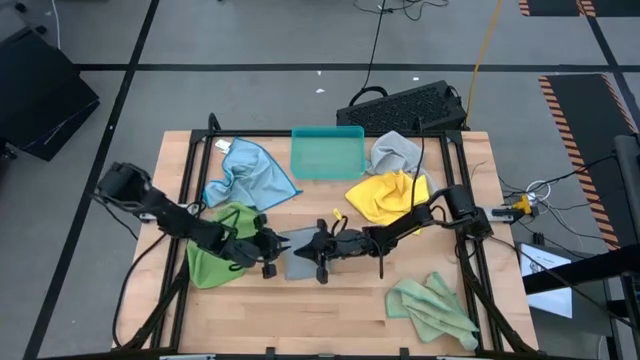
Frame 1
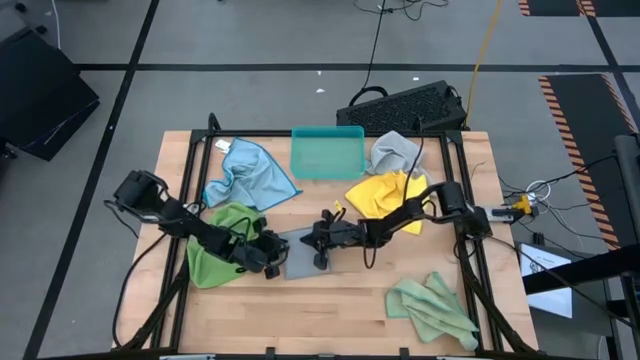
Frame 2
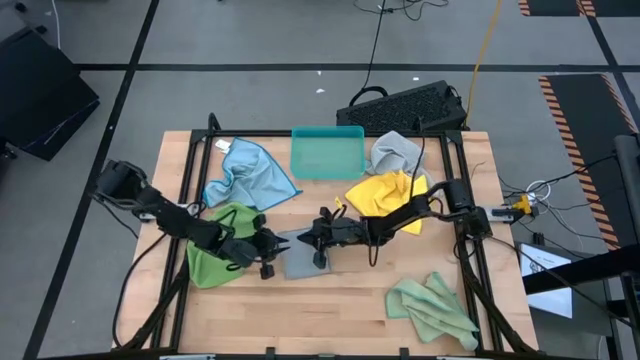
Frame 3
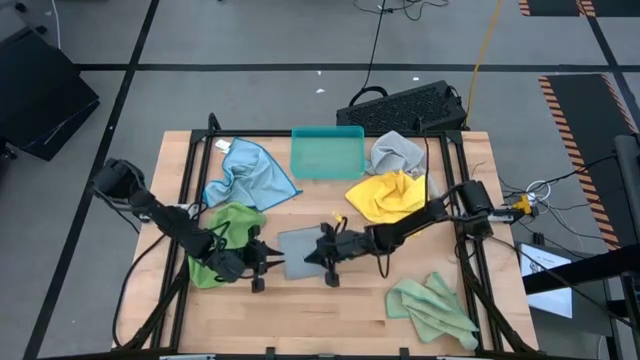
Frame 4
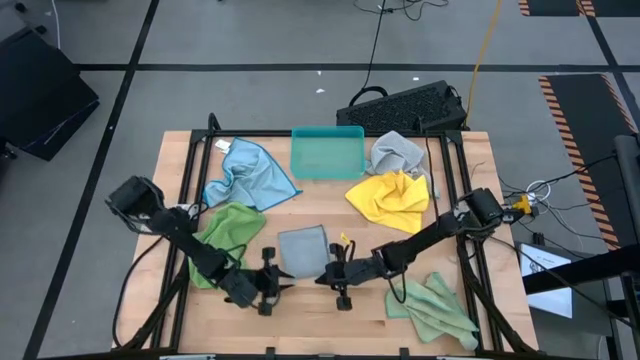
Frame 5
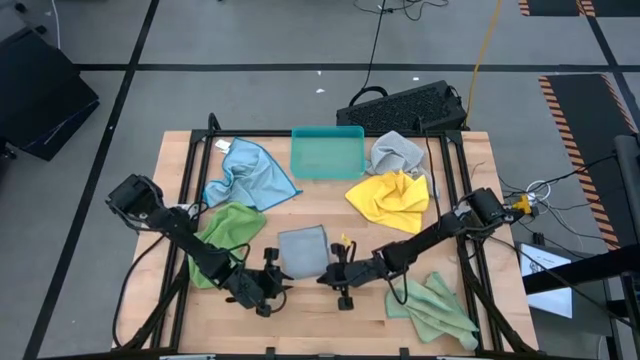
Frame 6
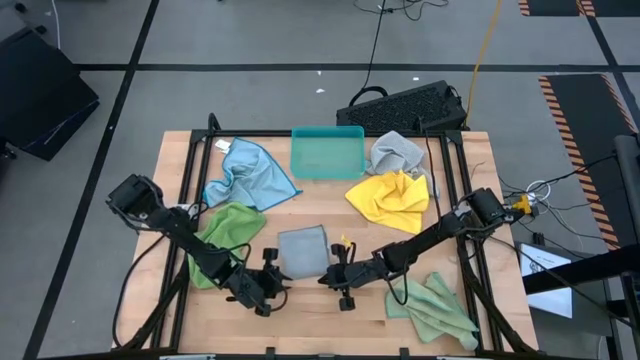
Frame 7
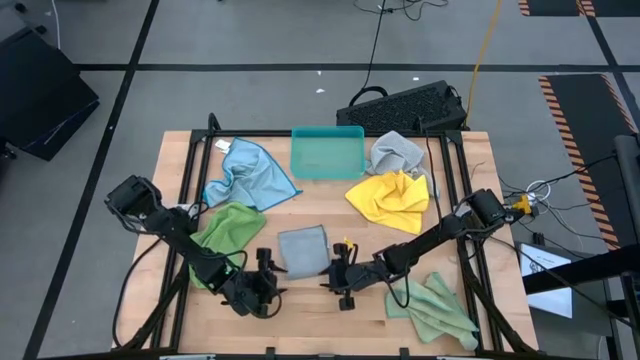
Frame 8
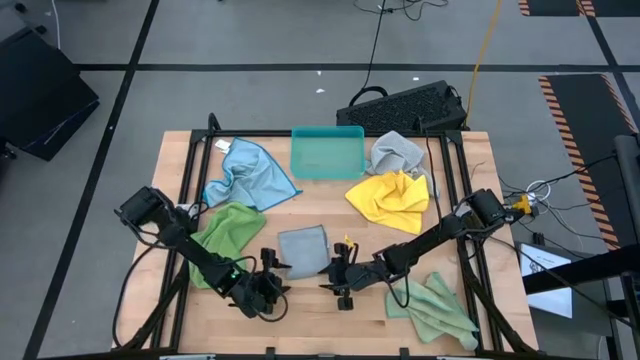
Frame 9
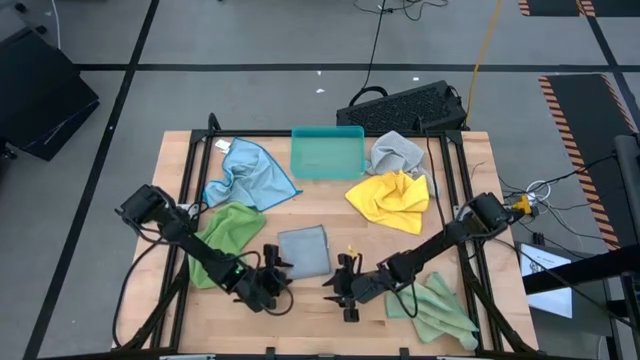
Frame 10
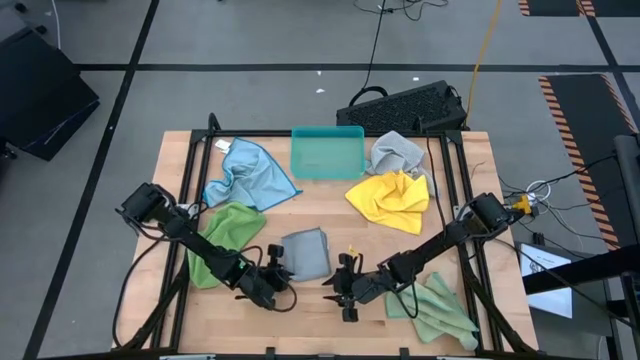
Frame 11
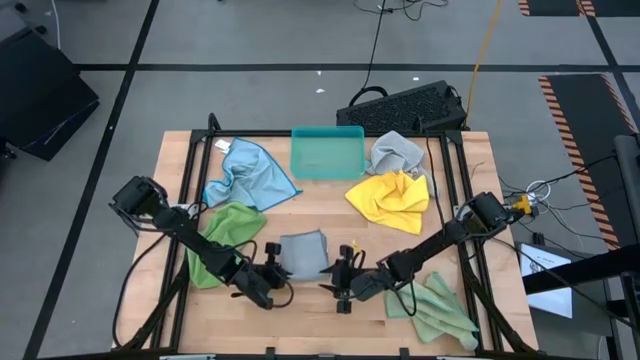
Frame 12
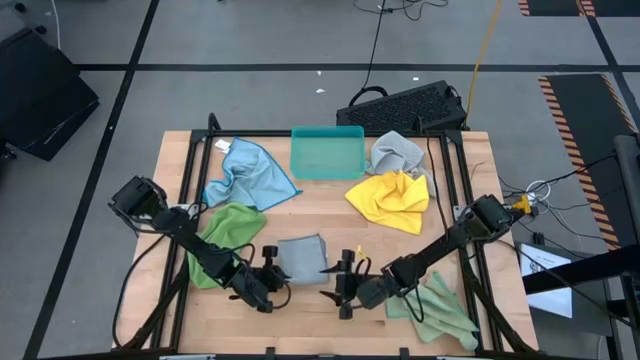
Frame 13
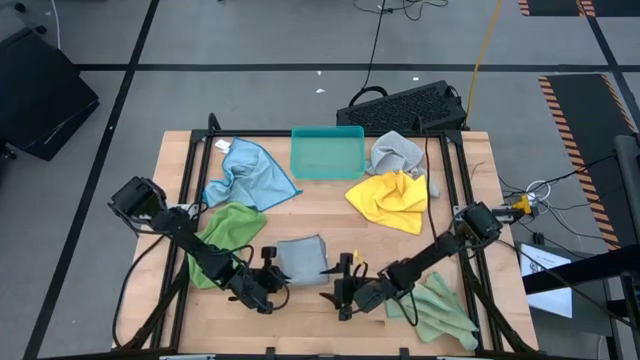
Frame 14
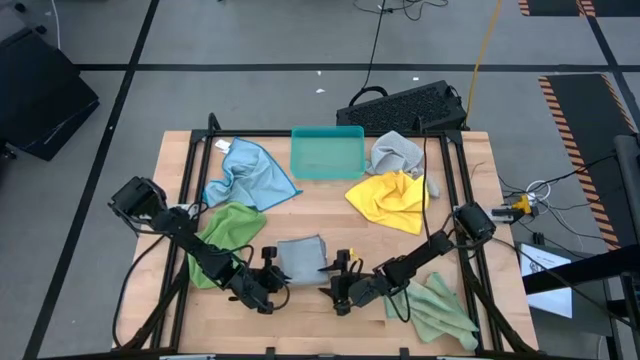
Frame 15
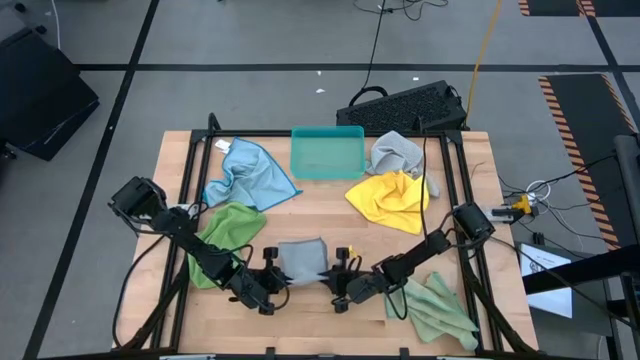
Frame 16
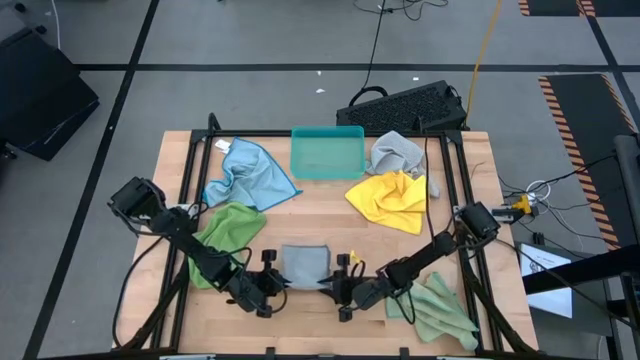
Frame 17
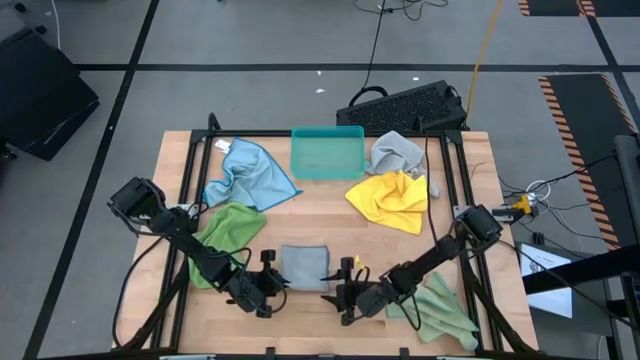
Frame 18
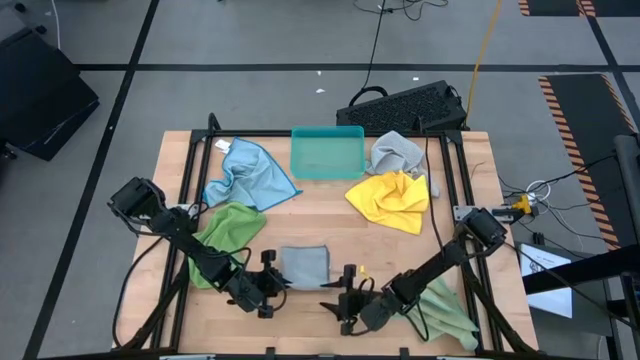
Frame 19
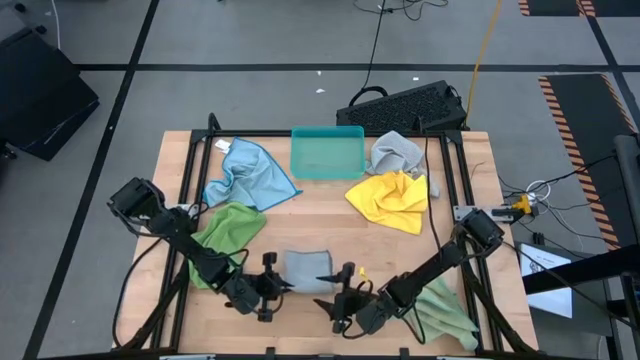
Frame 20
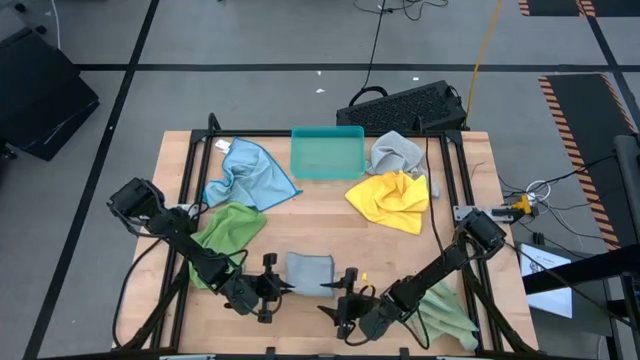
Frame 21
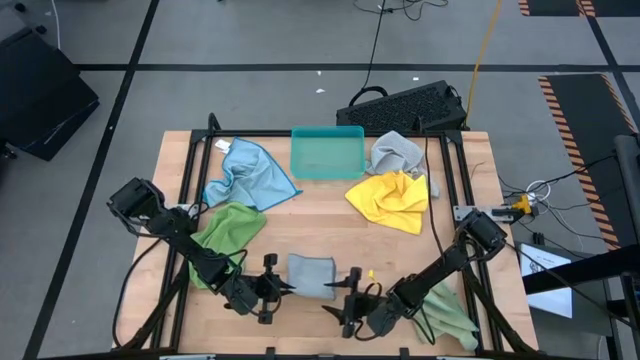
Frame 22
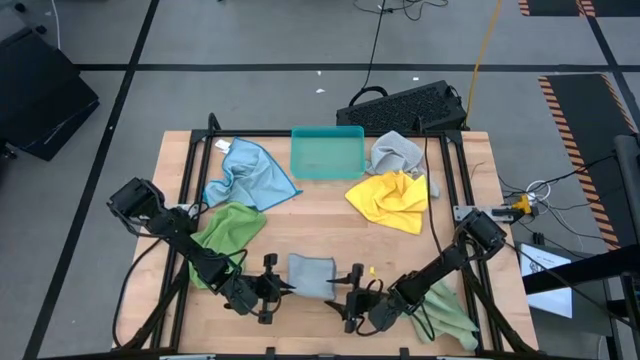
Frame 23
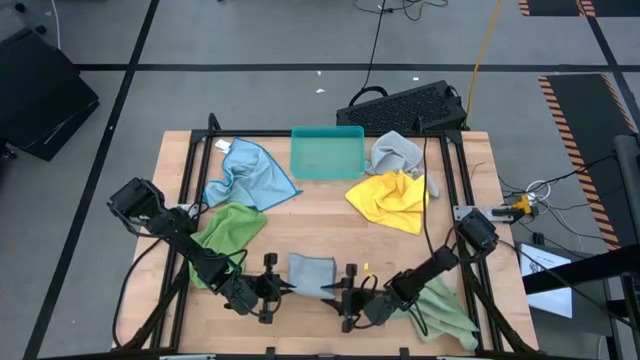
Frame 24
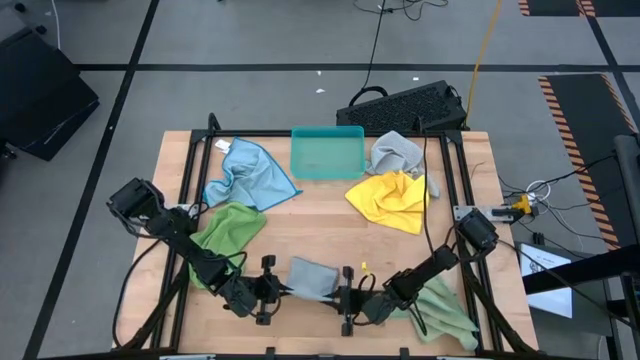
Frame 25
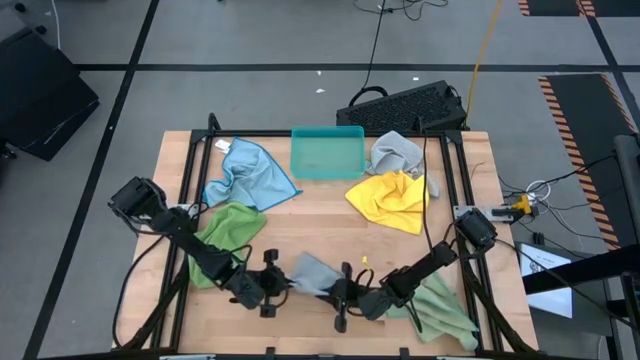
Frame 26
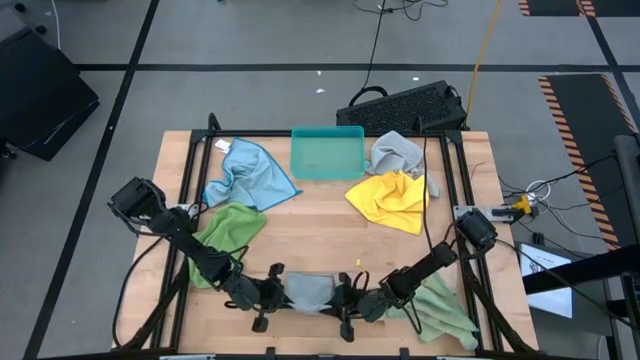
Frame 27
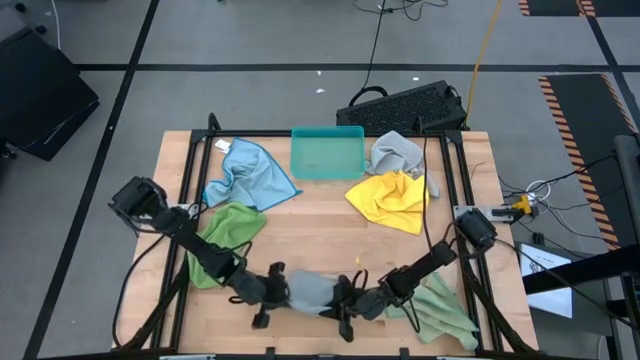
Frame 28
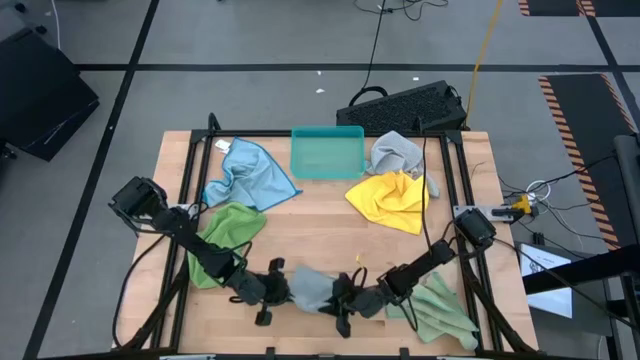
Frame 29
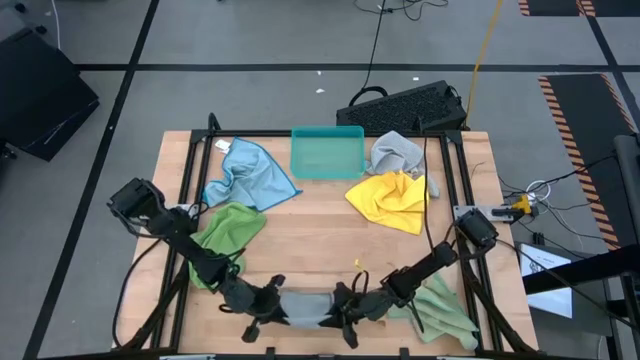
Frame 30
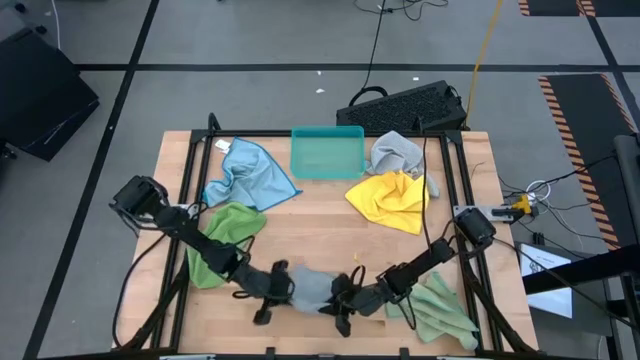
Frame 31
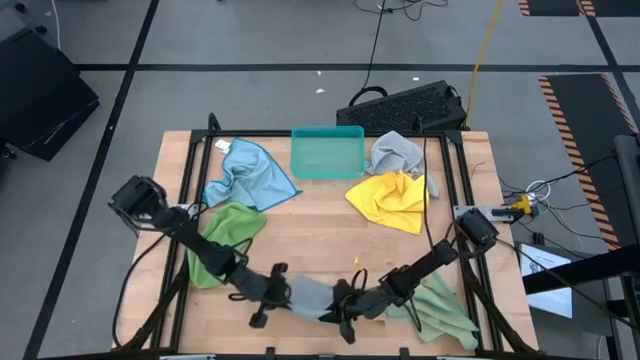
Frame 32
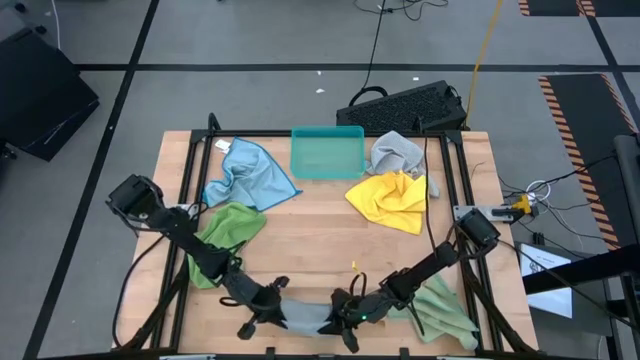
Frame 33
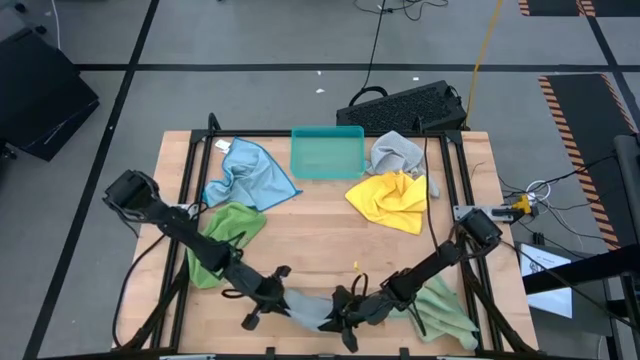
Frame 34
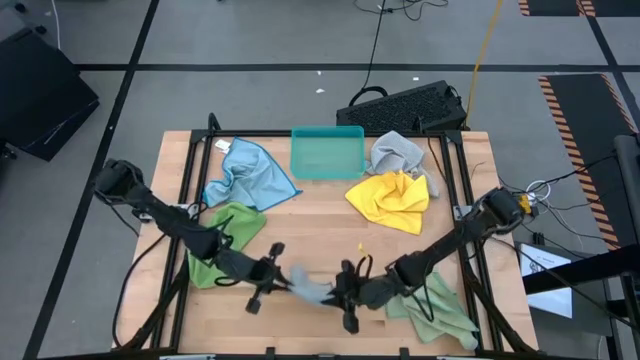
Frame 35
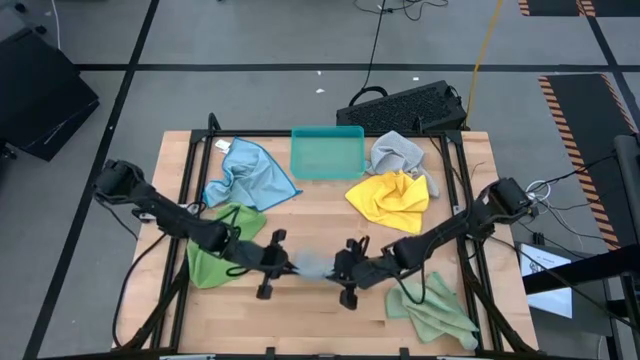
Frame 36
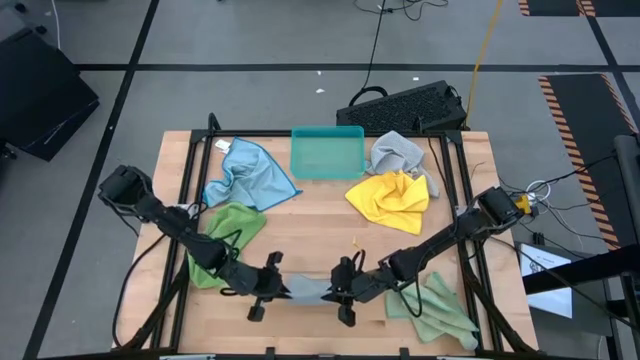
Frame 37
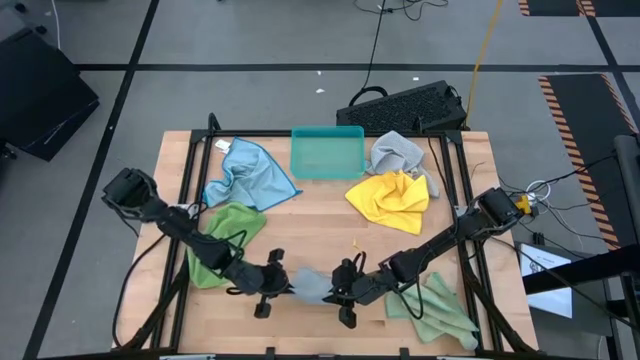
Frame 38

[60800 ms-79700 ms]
Task: Fold microfiber towels
Fold the dark gray microfiber cloth

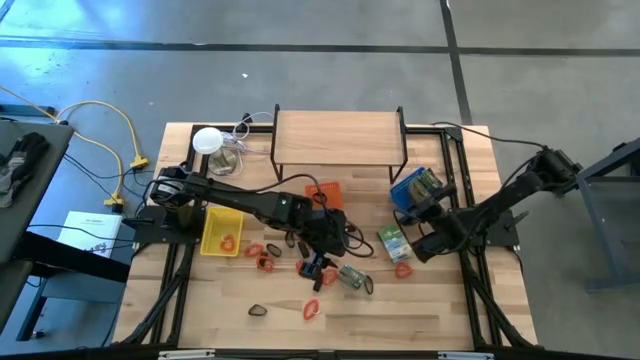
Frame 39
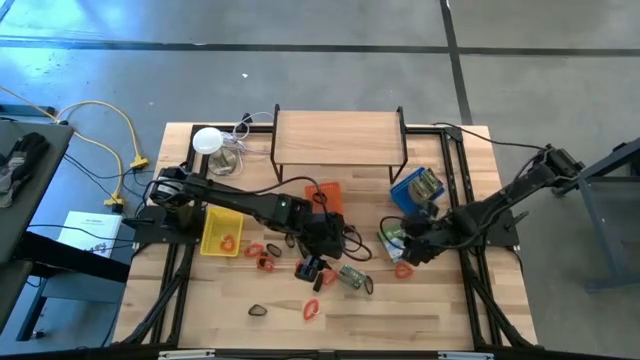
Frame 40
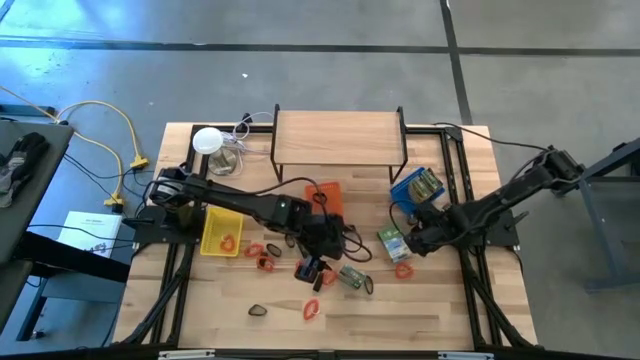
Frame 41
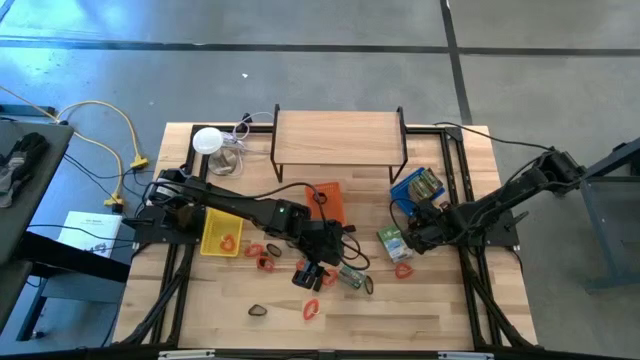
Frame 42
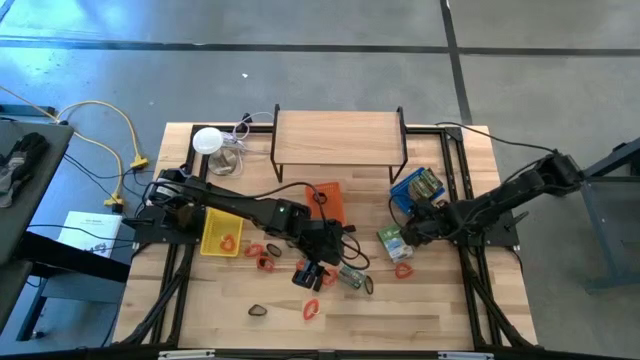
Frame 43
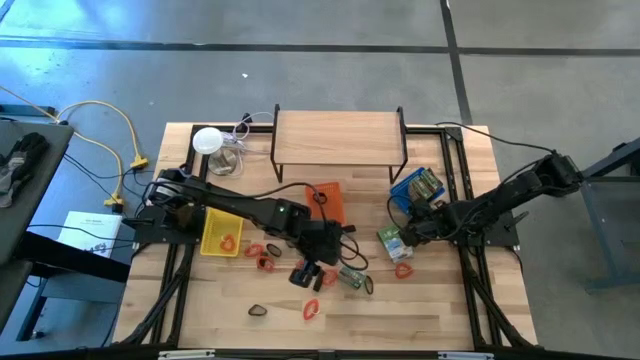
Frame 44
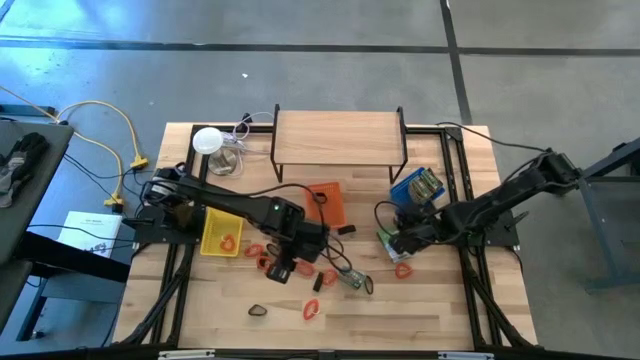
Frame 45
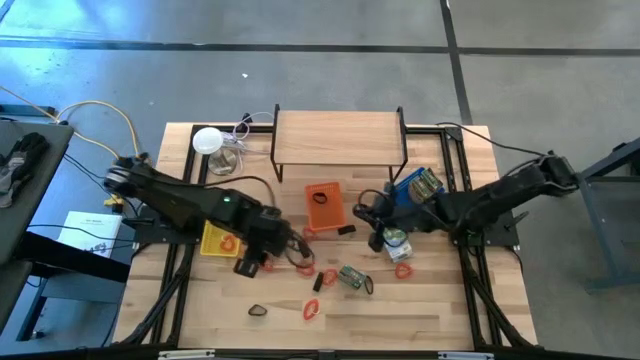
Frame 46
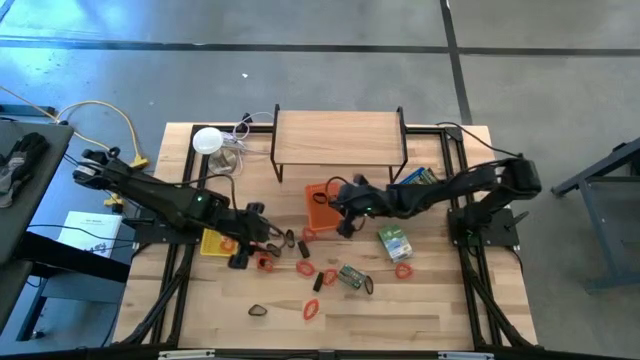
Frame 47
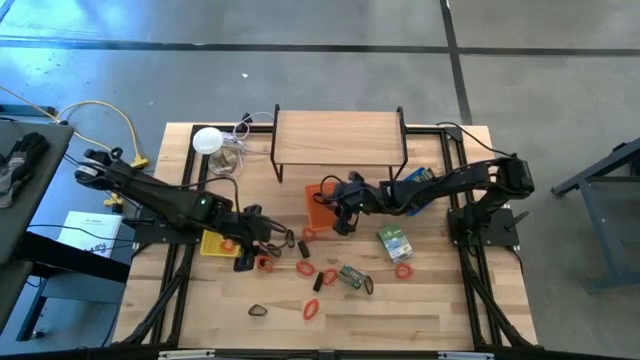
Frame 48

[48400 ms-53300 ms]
Task: Pick & Place Office Desk Supplies
Put the black rubber band into the orange bin
